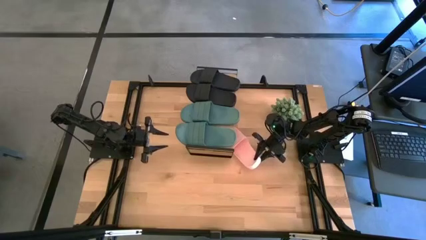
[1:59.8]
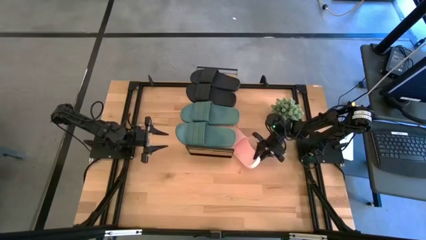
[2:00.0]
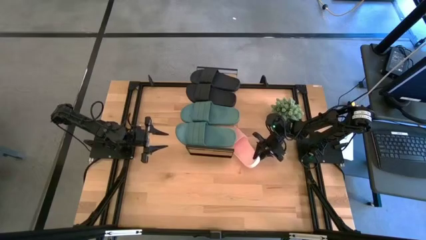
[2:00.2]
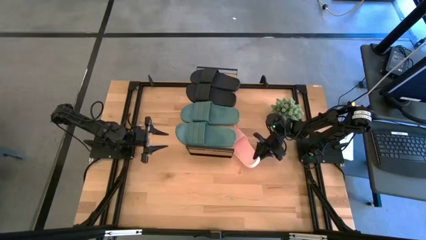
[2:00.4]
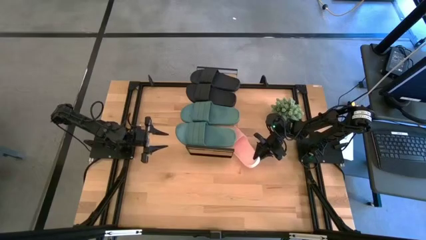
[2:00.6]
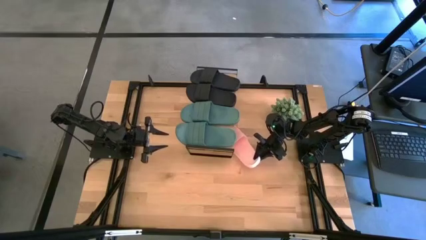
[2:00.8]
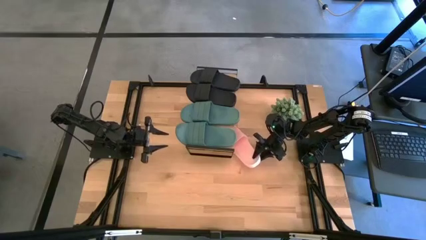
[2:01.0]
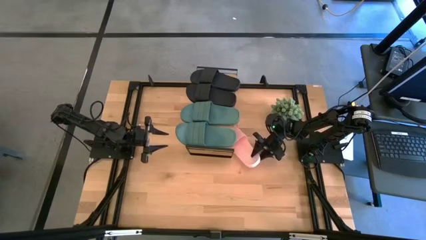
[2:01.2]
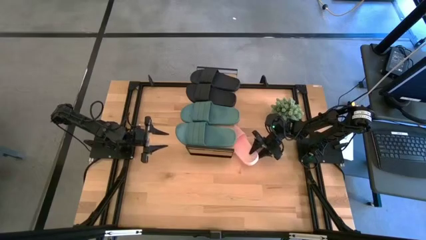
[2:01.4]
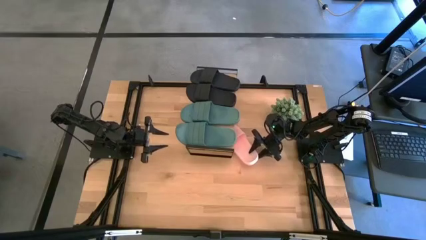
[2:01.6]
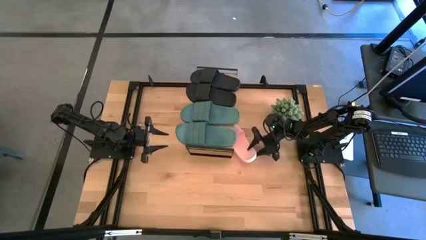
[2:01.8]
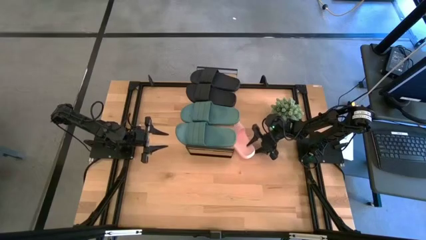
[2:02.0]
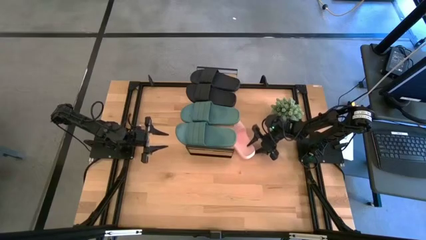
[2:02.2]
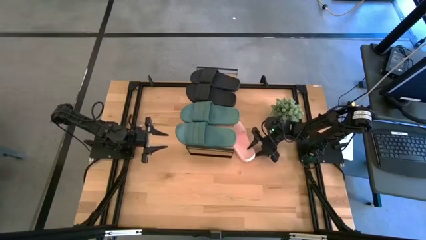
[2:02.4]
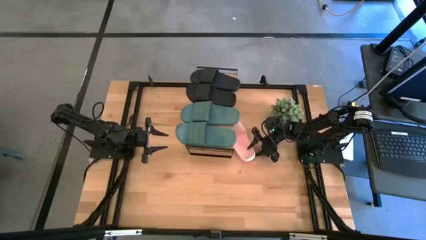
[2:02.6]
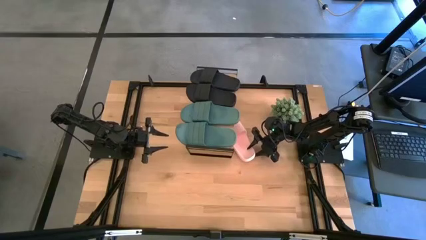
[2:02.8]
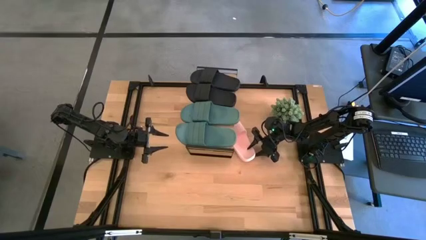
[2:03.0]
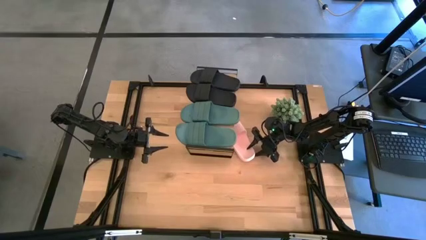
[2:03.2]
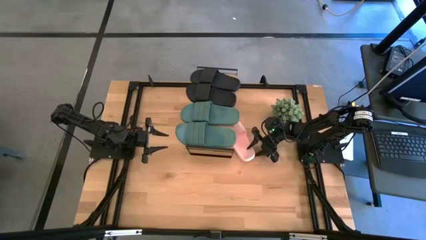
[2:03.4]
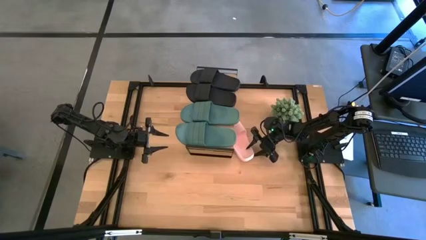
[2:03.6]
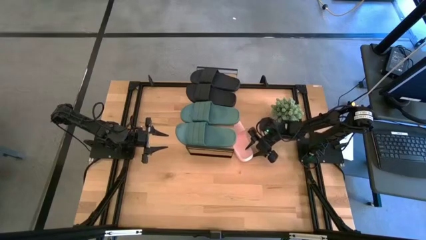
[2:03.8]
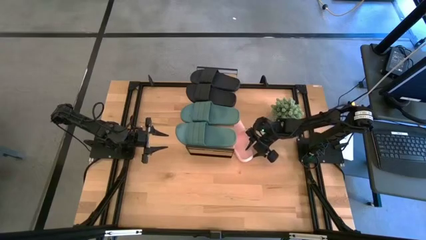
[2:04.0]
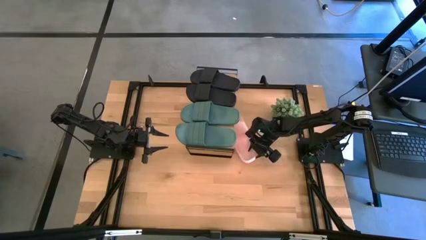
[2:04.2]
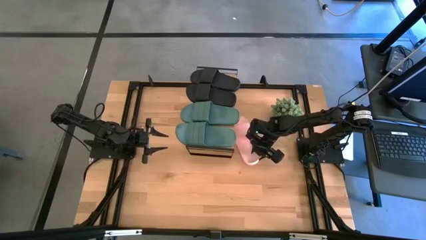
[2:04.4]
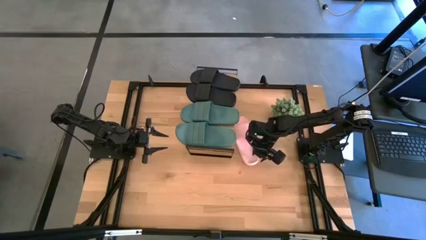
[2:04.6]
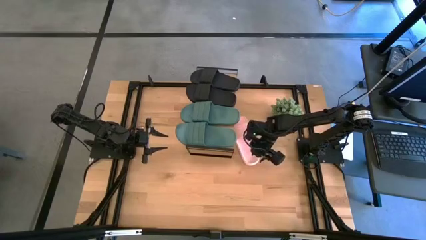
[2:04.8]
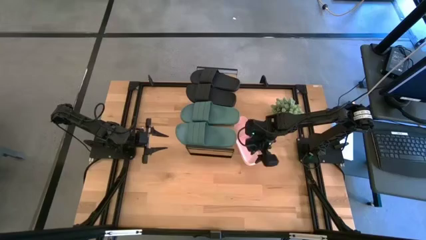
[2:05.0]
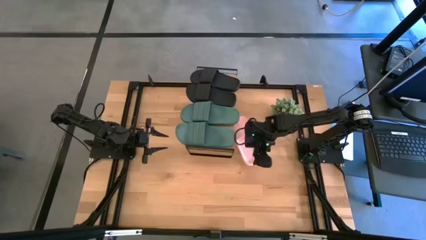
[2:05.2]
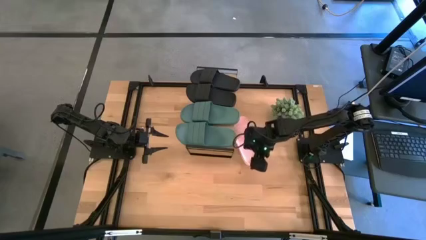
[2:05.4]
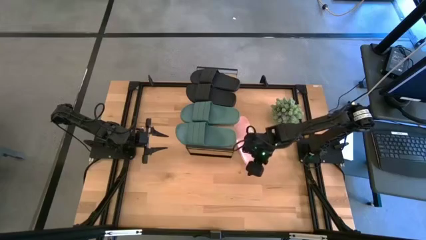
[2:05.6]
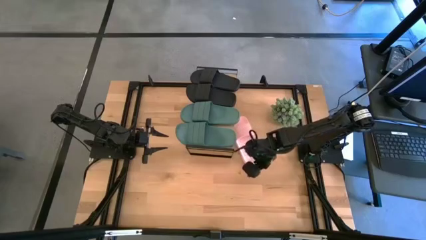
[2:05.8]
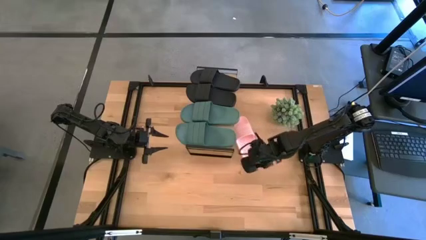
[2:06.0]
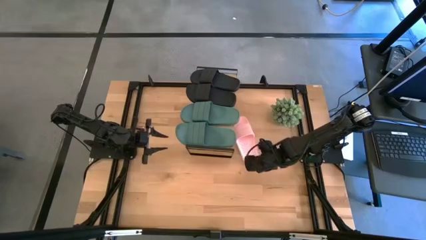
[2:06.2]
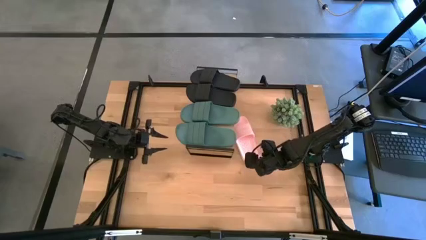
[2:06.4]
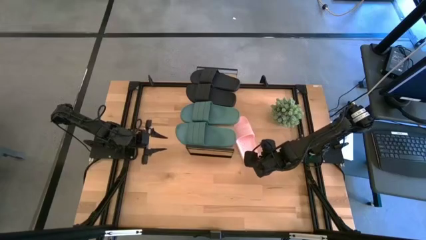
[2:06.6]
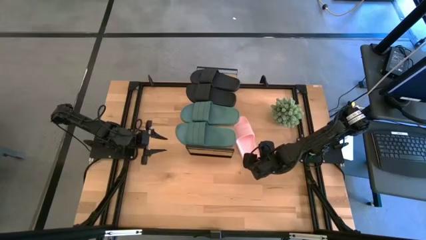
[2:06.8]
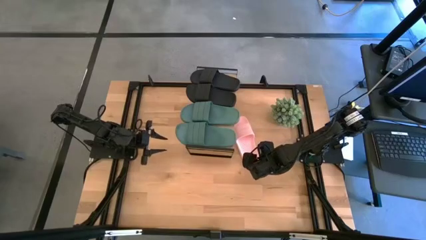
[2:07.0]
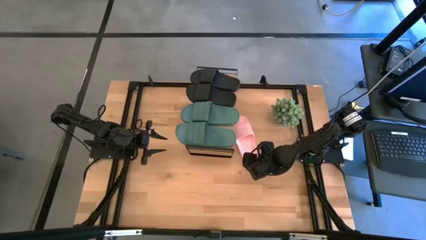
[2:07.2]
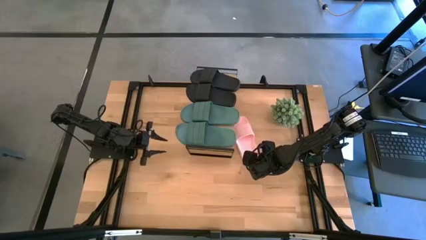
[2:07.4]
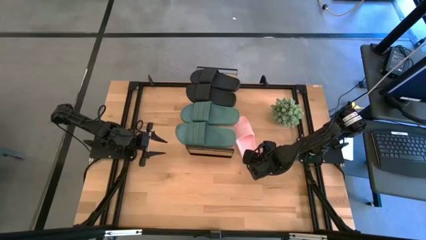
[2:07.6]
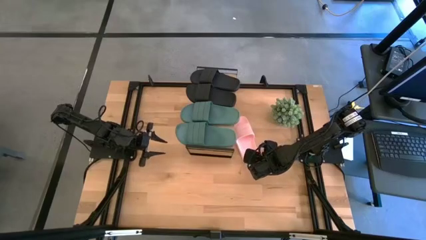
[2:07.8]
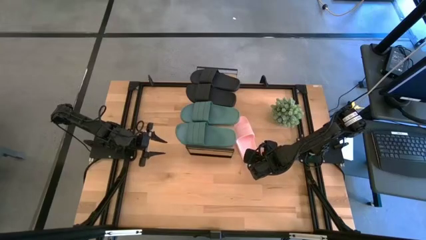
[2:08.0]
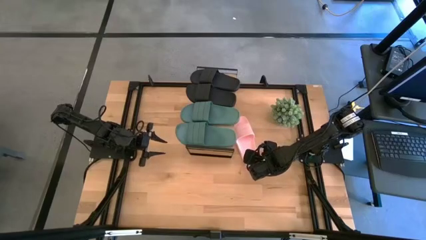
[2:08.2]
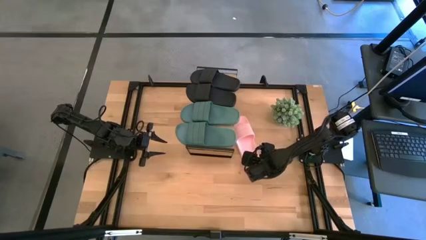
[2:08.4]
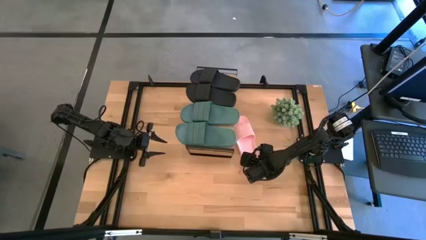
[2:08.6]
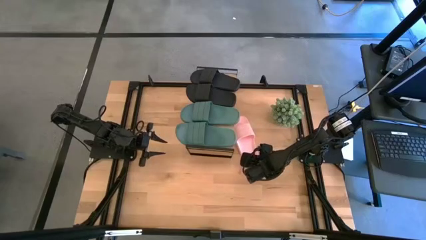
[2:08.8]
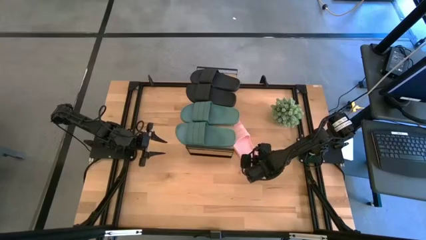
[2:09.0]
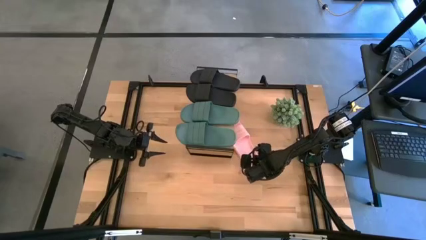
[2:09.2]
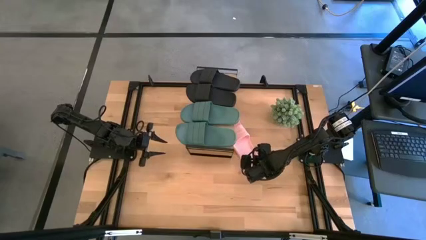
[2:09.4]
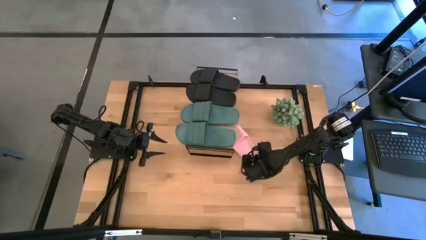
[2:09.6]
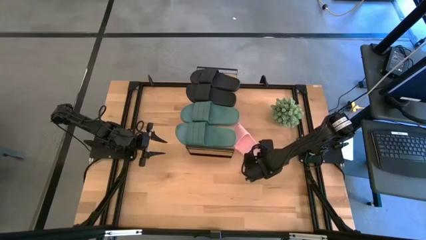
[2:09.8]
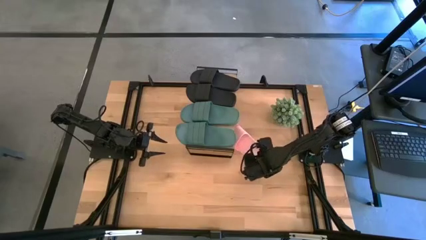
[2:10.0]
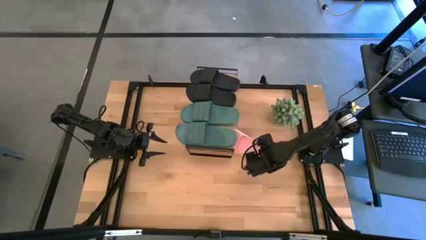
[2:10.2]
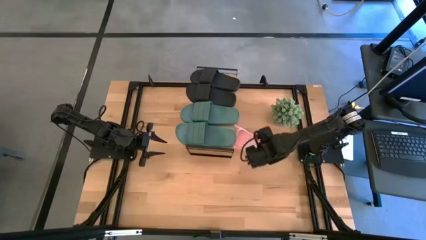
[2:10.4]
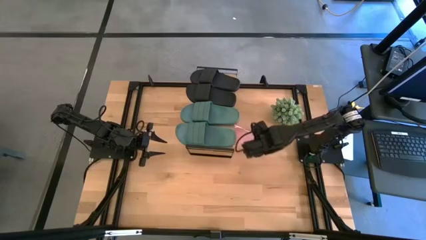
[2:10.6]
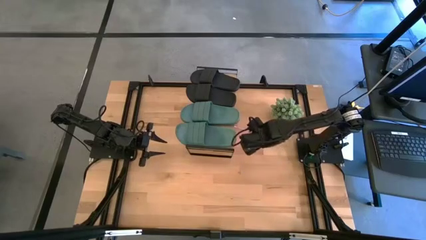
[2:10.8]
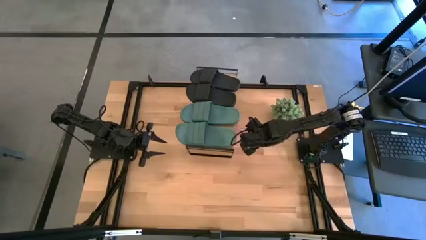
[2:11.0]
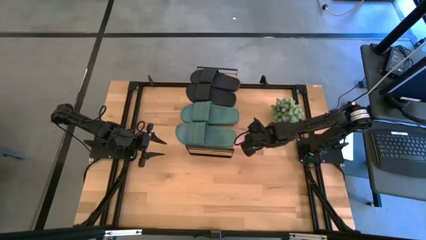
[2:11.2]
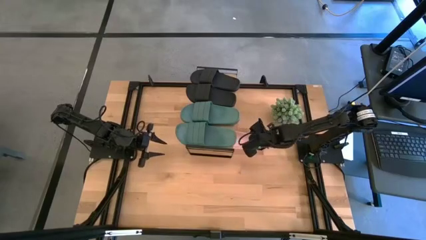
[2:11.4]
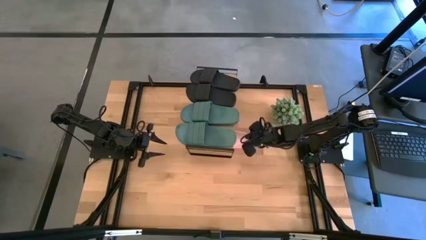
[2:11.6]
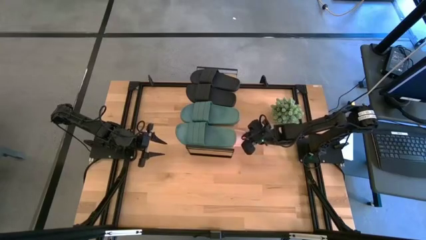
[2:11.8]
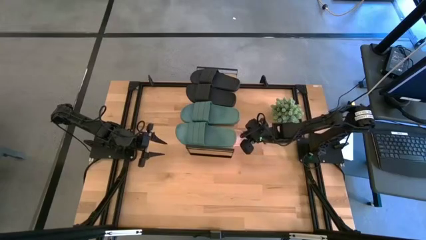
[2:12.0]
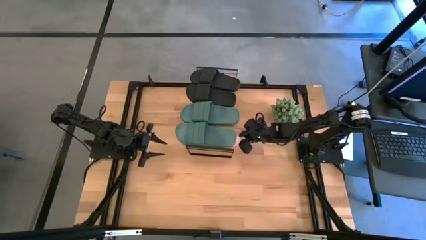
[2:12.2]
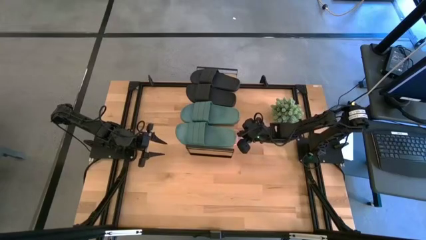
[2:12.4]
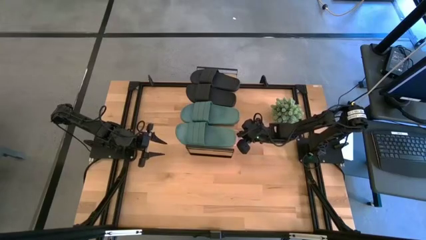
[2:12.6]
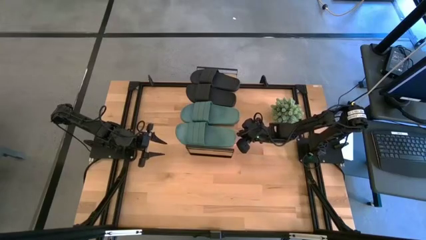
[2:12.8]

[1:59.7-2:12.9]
Task: Pick and place slides into the shelf
Put the pink slipper under the shelf

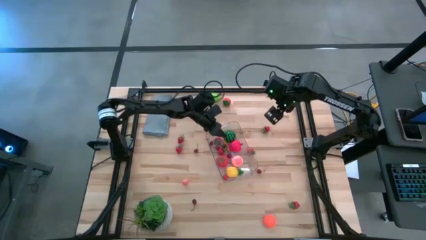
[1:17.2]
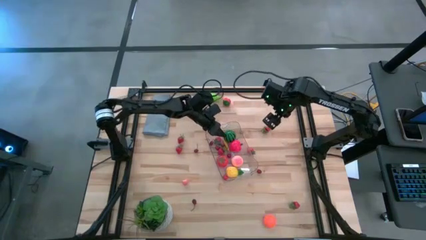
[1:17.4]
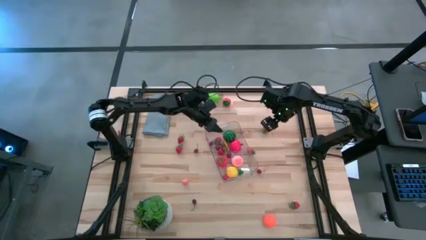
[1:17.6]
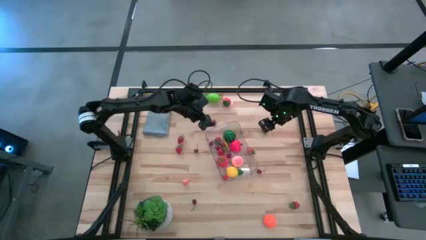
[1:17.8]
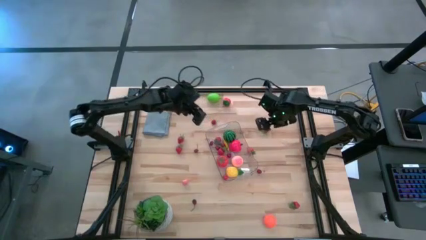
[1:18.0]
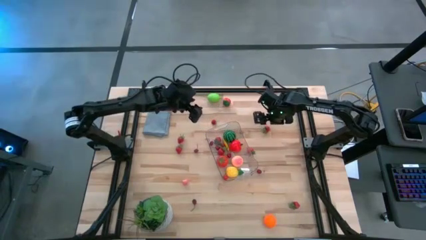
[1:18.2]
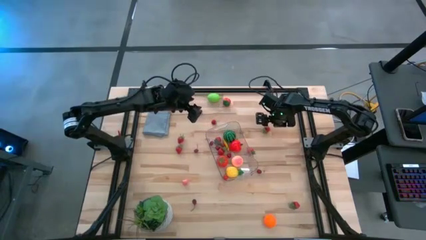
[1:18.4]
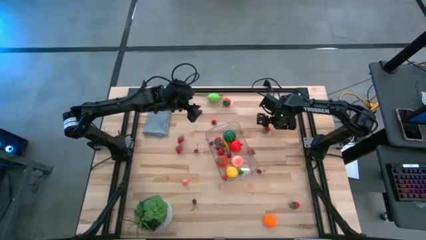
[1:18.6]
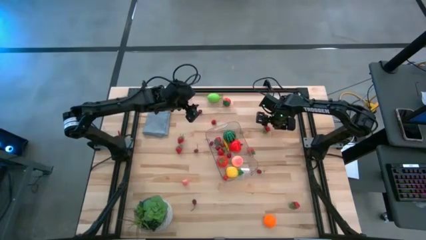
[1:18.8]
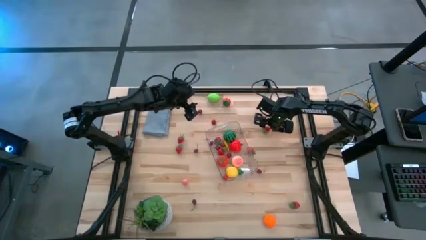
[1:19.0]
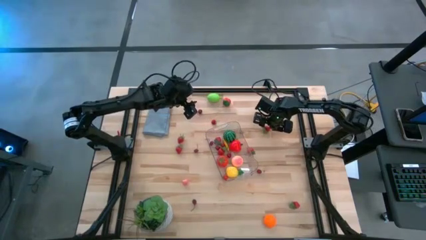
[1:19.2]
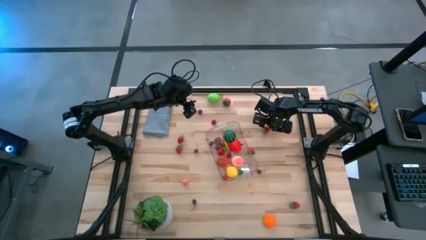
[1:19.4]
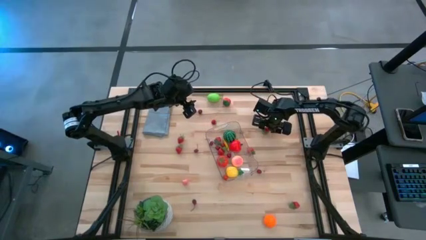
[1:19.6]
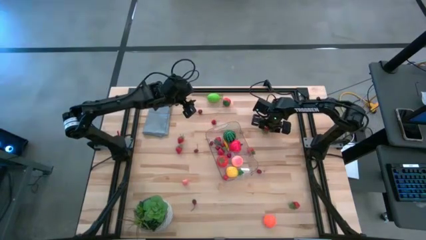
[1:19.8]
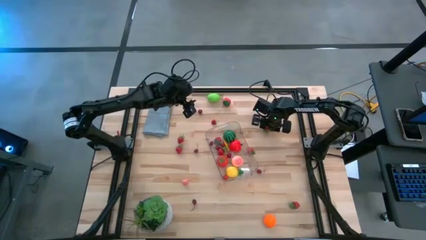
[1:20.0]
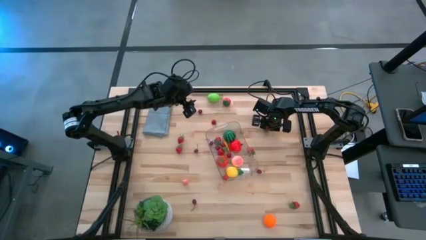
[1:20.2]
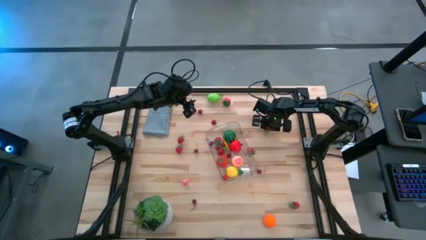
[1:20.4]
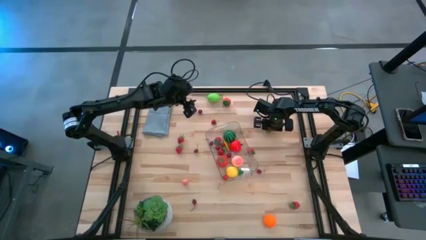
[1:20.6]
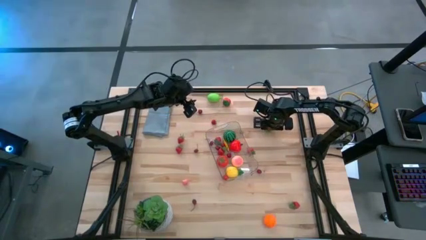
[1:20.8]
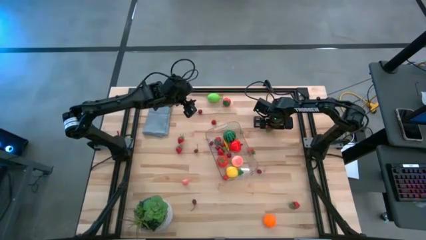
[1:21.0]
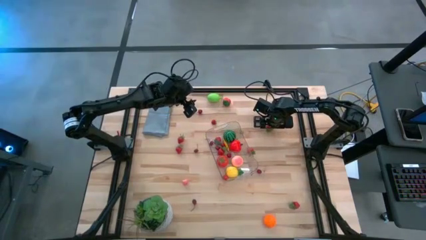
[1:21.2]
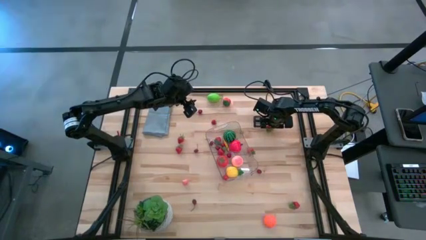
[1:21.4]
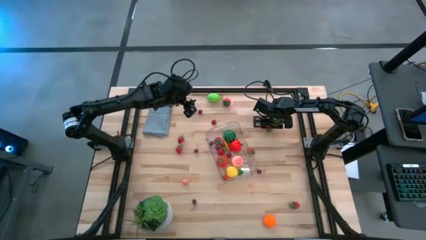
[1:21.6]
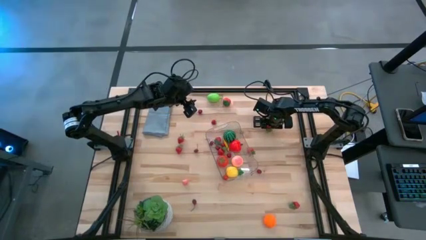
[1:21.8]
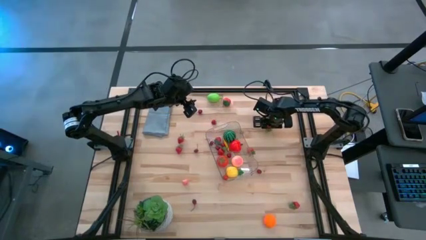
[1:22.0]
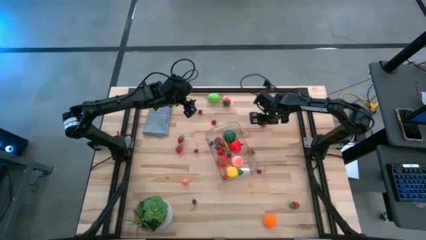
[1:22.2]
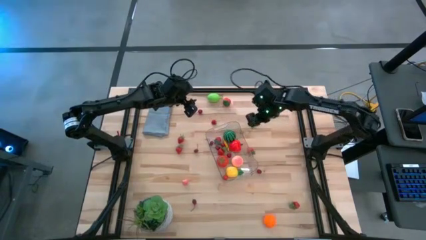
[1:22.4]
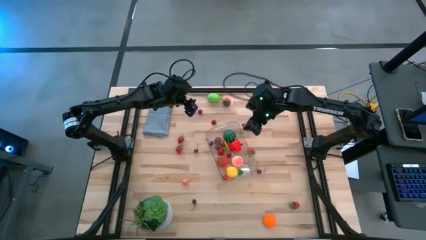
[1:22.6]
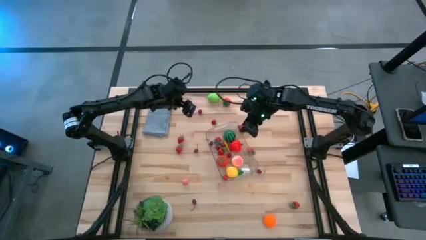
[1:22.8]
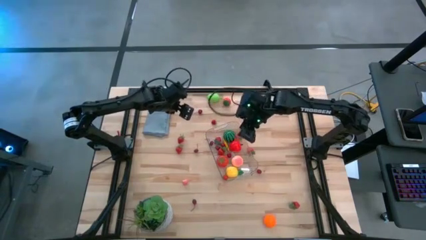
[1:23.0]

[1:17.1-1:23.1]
Task: Pick and placing Produce into tupperware
Put the red strawberry into the transparent bin
